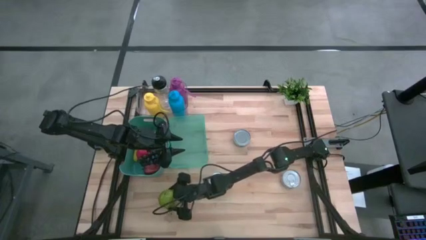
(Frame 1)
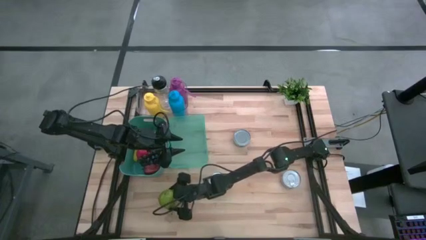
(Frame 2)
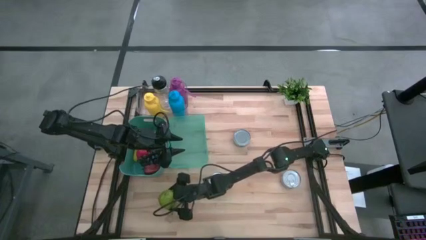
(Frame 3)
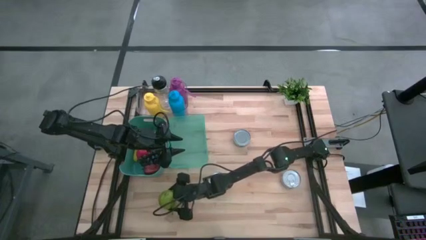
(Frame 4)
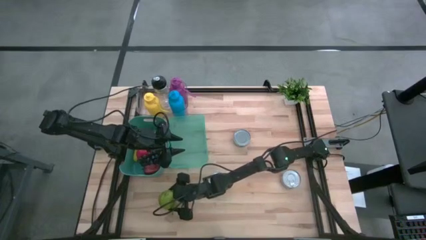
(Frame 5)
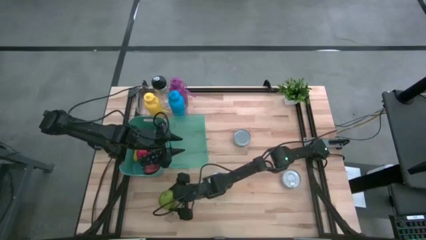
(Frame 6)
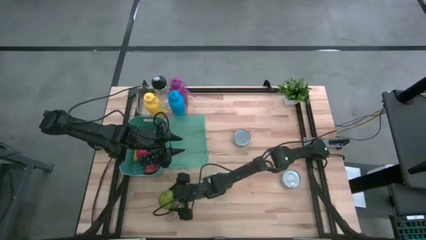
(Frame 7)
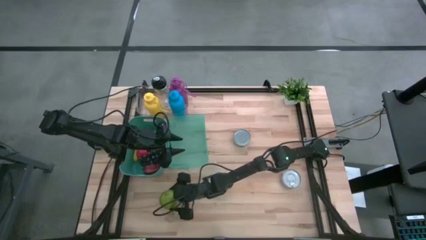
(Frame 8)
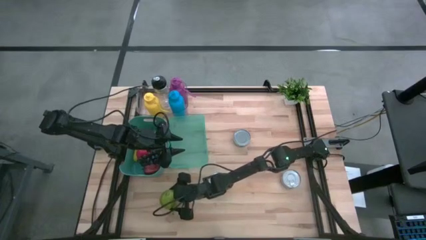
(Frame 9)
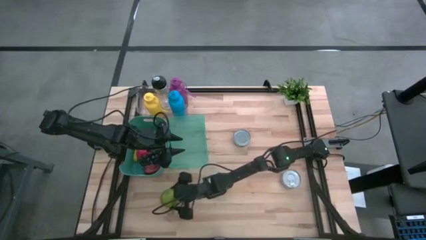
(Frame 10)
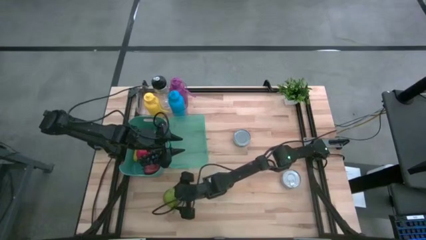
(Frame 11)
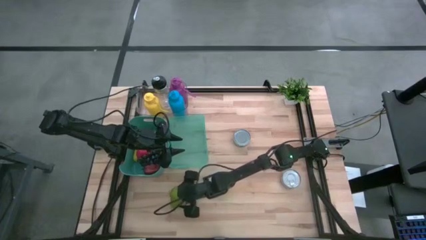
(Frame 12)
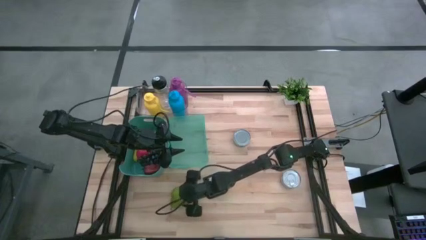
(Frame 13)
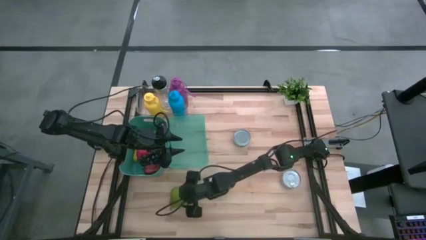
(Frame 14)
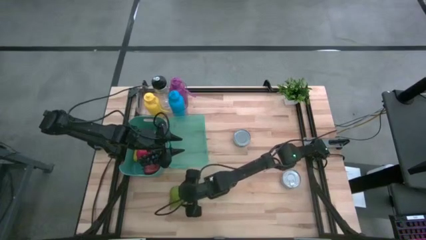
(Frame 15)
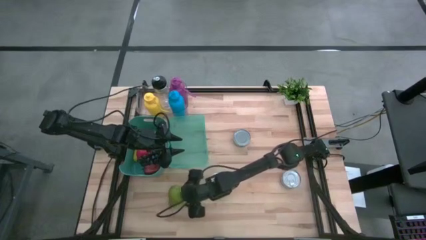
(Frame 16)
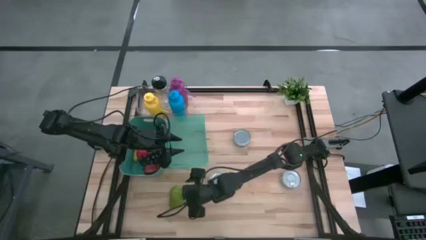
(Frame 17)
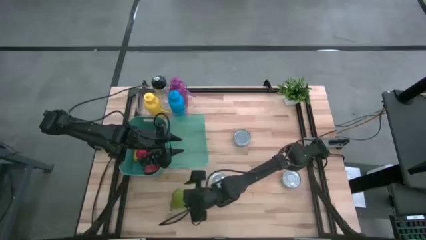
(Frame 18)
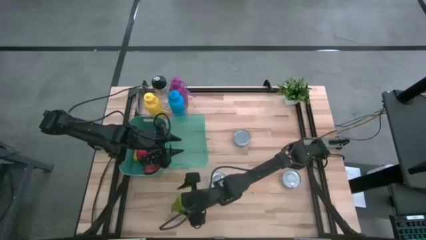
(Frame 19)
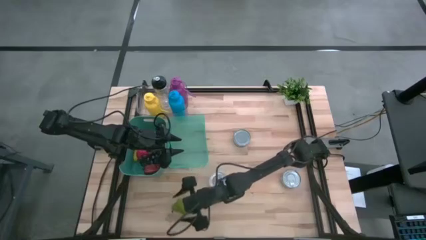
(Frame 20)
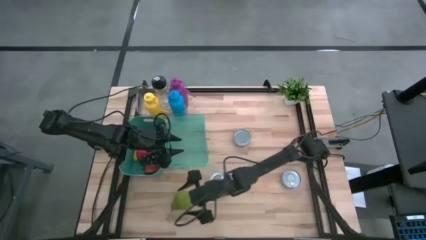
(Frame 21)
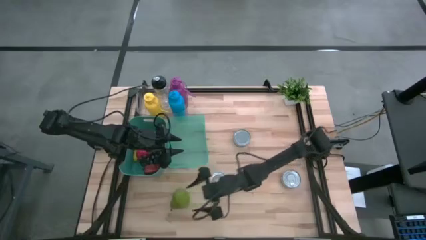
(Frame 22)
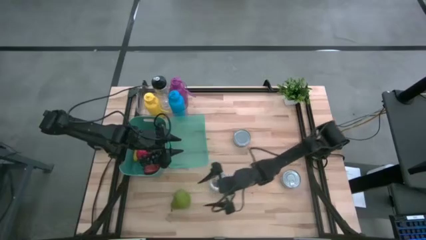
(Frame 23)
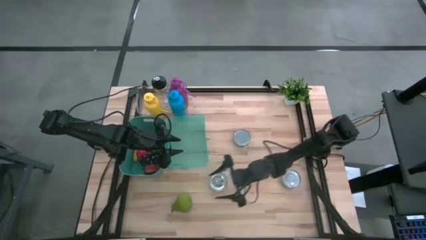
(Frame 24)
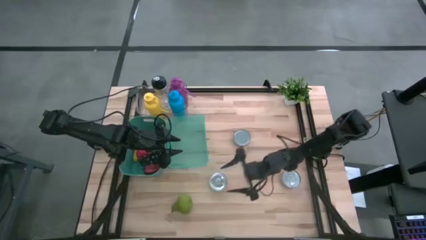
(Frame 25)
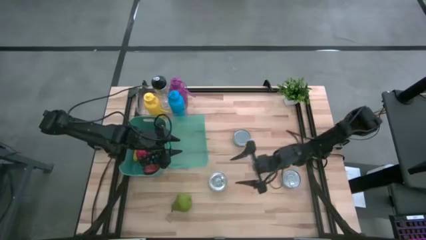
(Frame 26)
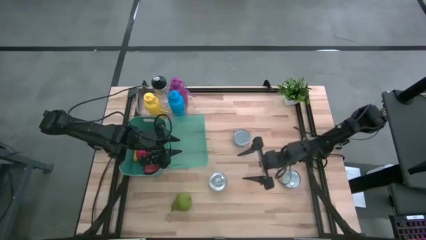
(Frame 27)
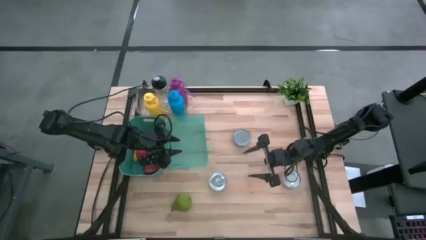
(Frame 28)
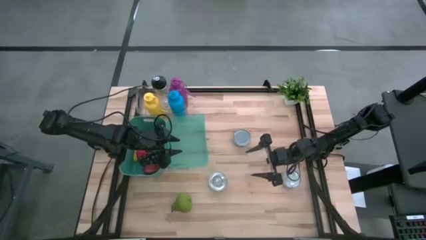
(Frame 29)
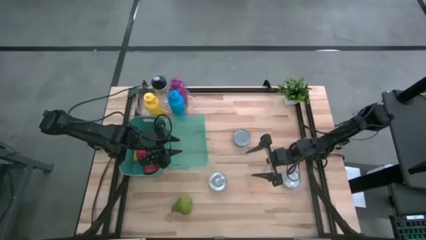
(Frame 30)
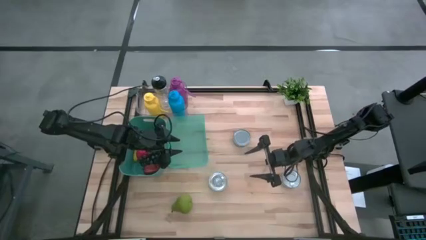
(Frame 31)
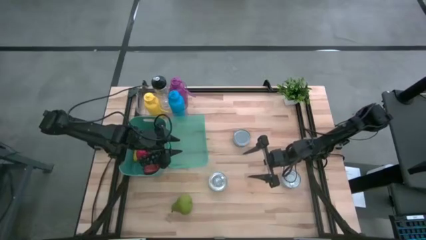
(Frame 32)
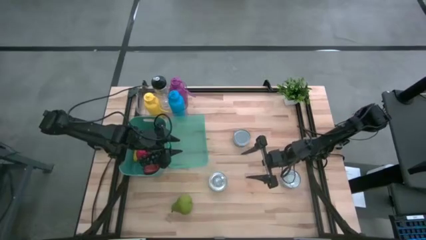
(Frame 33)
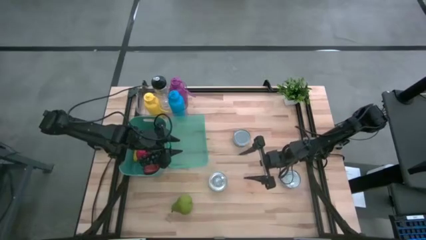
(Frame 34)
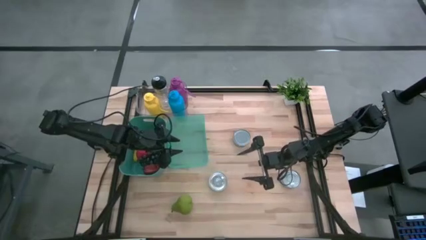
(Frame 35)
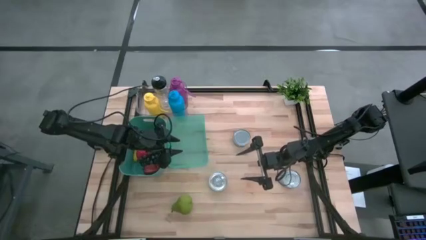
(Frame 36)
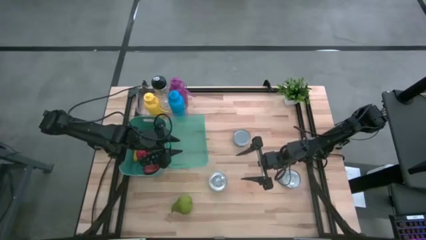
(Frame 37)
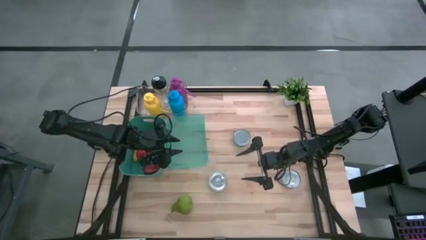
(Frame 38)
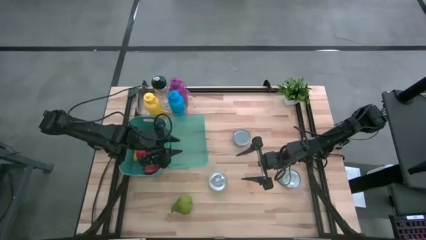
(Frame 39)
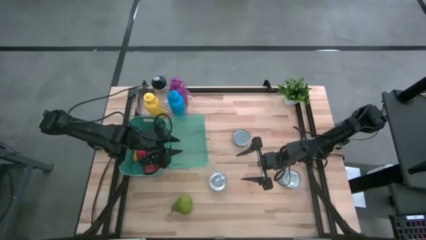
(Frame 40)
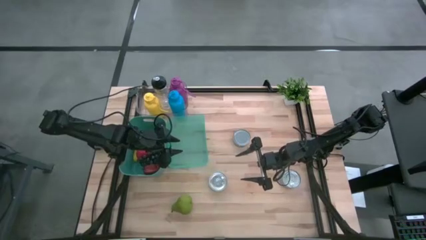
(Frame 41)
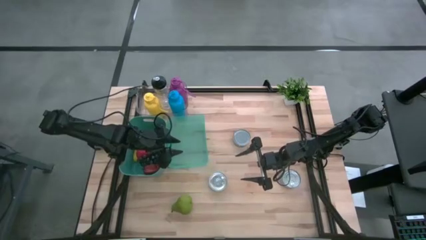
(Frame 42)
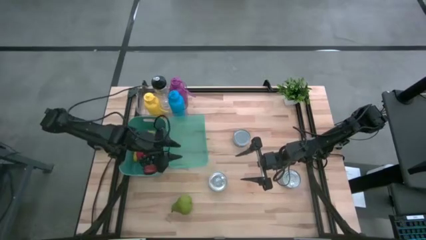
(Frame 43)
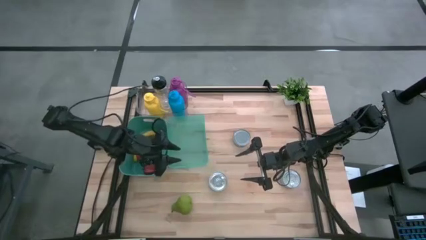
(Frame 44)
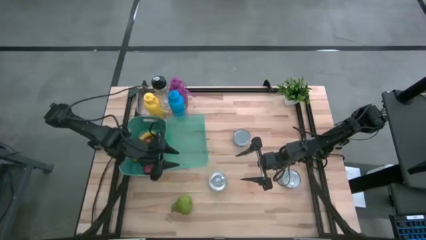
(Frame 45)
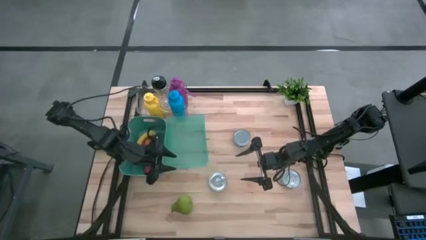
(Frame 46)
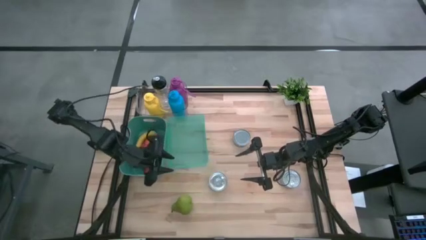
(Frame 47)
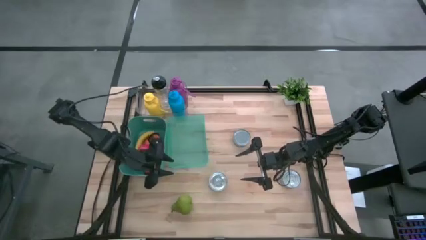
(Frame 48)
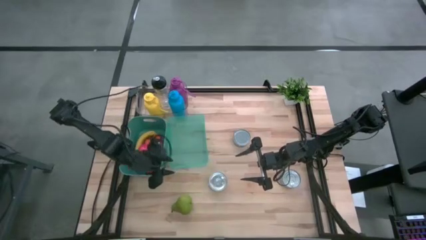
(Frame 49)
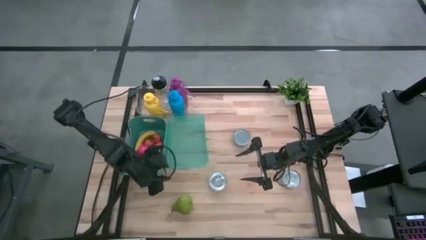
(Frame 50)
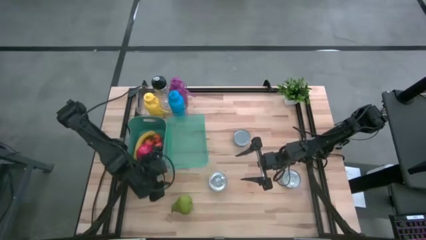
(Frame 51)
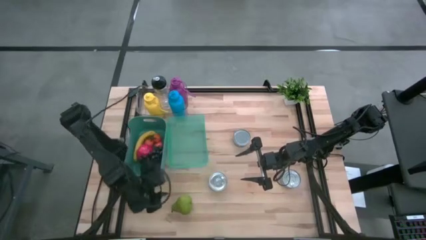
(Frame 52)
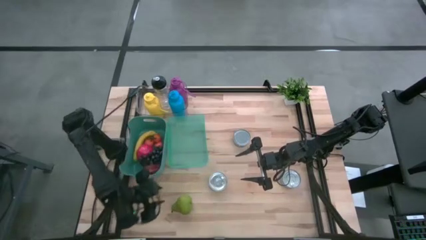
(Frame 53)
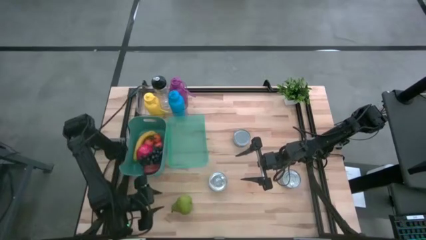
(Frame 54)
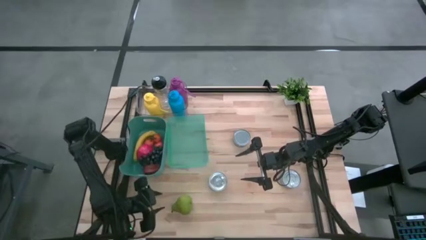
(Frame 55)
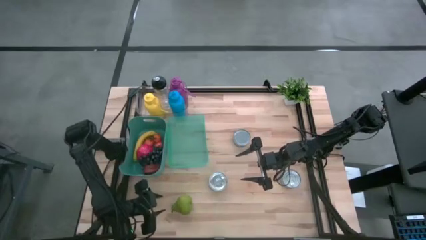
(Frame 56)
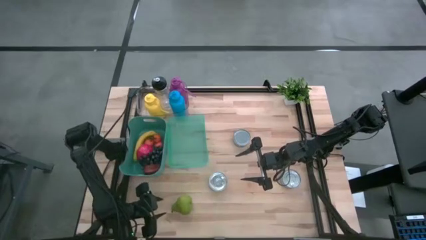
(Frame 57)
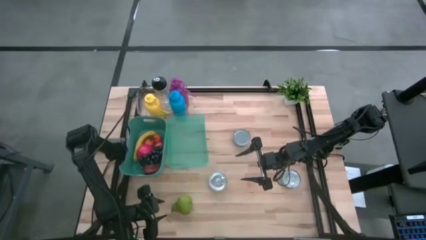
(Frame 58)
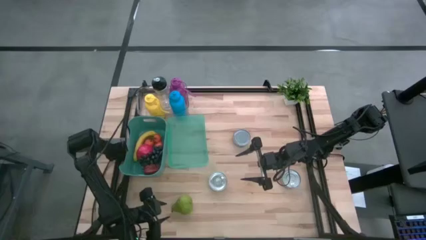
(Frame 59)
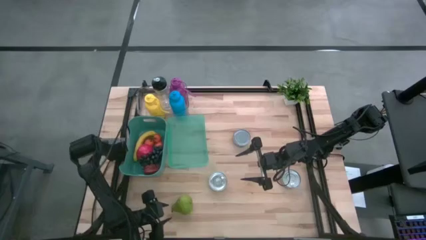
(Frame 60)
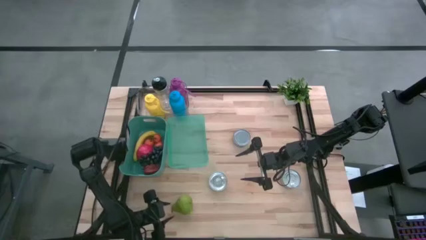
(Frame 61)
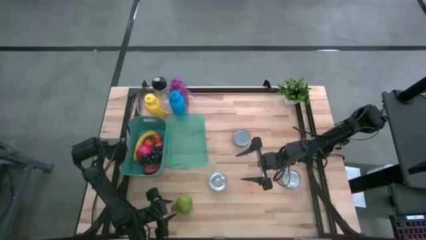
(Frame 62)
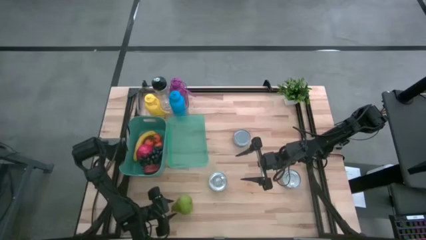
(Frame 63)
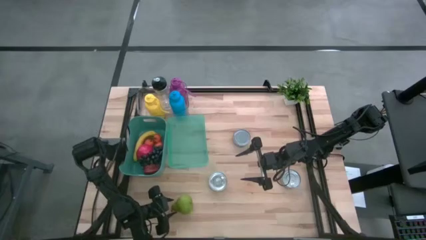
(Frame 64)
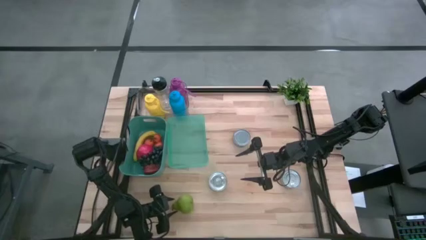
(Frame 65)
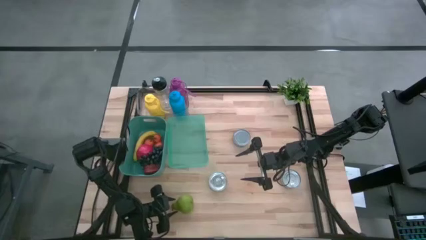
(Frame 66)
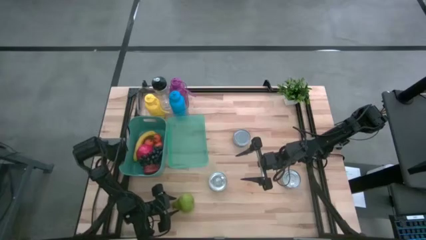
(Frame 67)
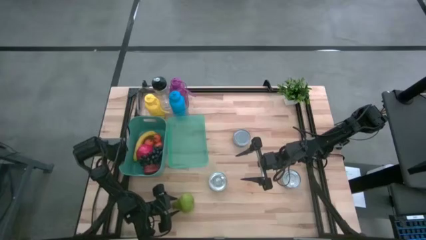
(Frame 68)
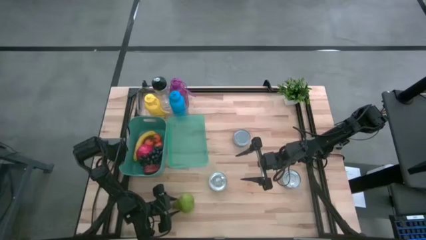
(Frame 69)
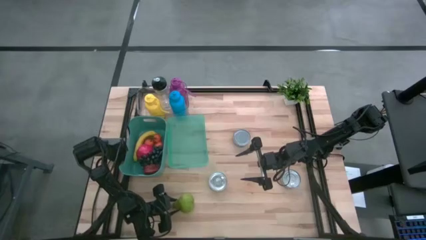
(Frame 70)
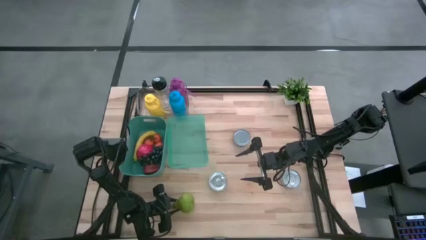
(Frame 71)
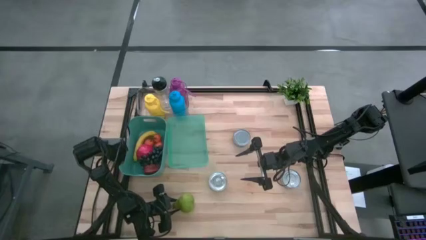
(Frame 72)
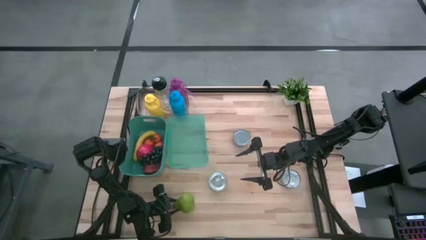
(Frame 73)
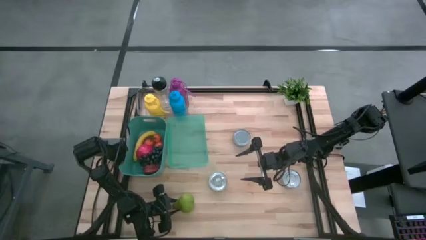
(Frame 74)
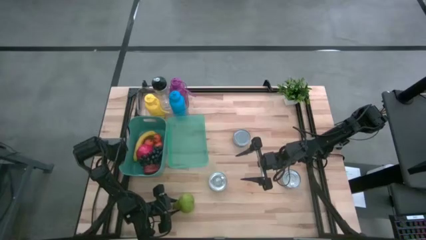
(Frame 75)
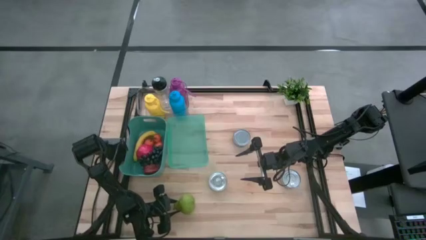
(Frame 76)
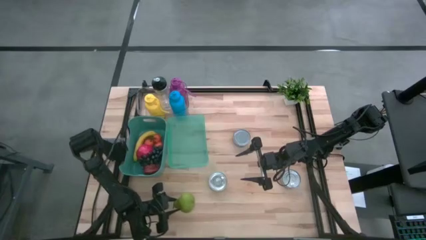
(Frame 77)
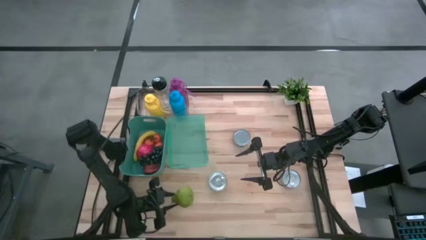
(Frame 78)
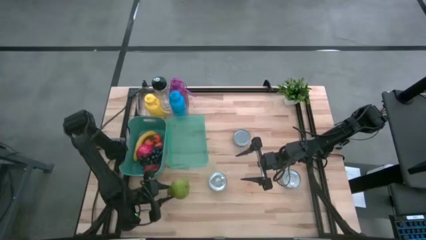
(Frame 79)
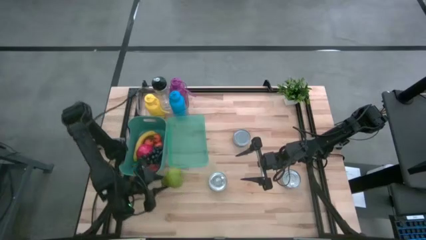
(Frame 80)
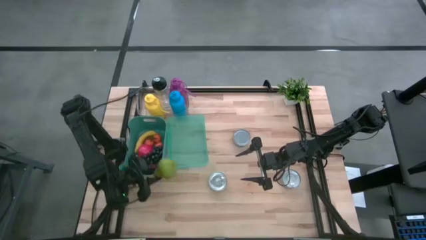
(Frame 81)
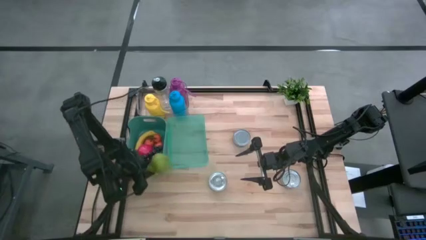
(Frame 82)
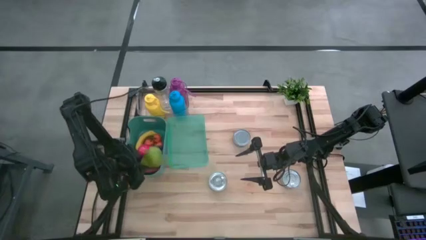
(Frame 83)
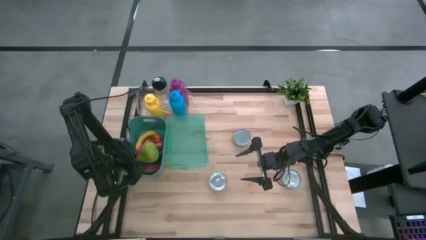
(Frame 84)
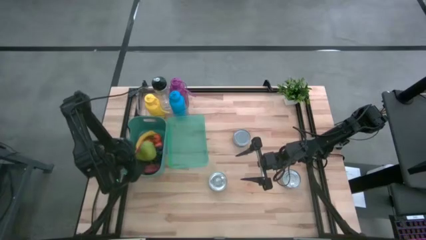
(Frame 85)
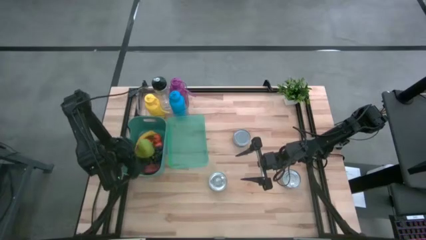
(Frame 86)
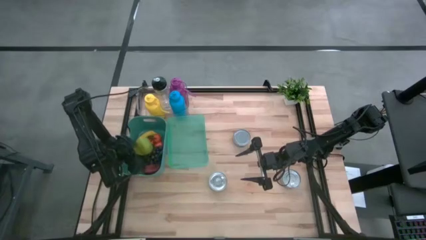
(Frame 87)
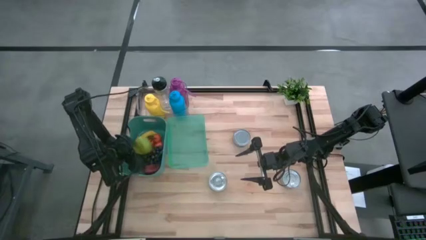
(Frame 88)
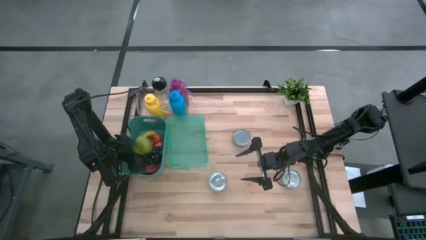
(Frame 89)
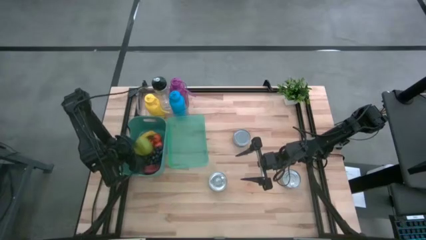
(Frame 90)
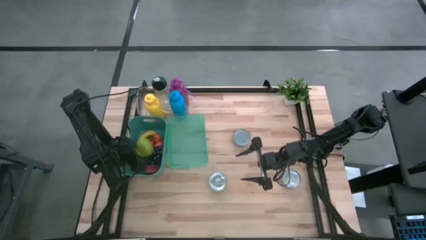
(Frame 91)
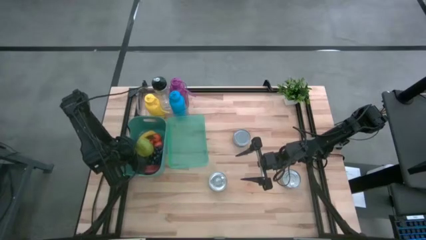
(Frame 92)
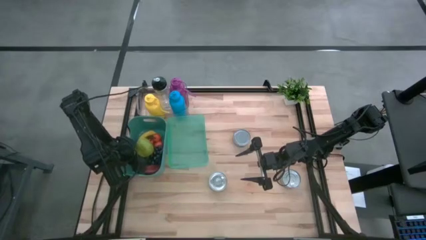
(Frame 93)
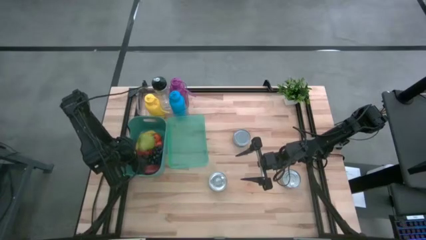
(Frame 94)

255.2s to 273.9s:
Task: Pick & Place Food Item
Put the pear into the green bin
